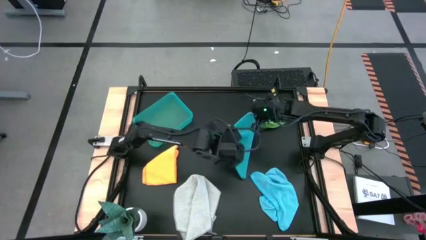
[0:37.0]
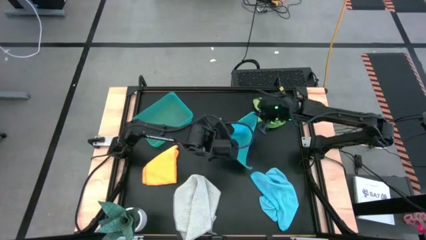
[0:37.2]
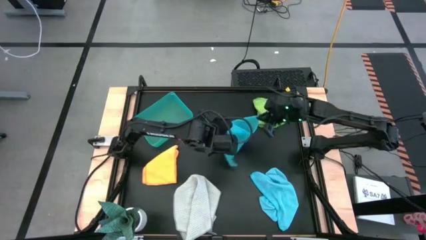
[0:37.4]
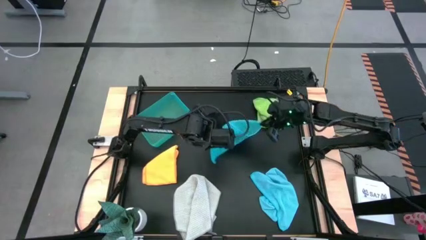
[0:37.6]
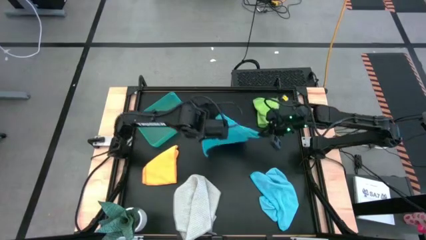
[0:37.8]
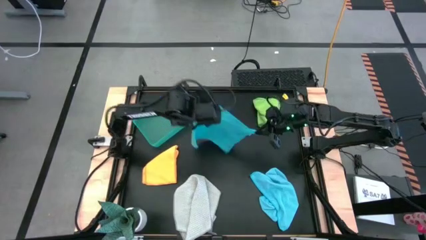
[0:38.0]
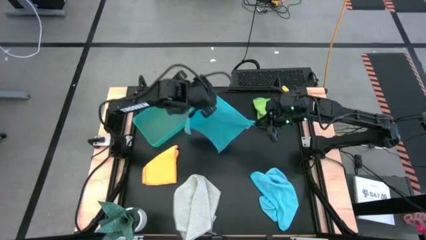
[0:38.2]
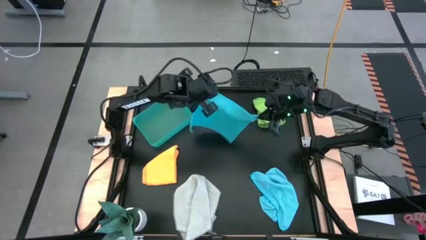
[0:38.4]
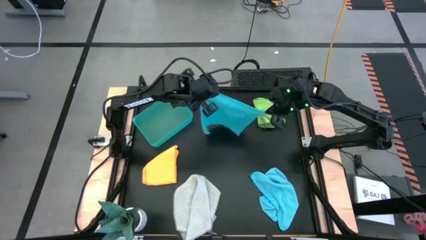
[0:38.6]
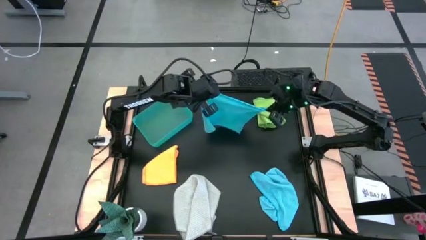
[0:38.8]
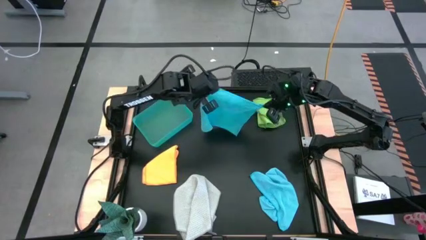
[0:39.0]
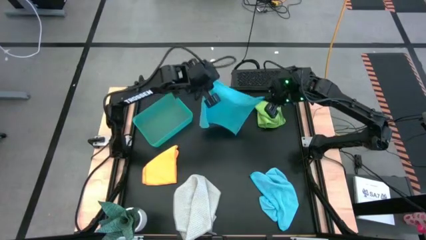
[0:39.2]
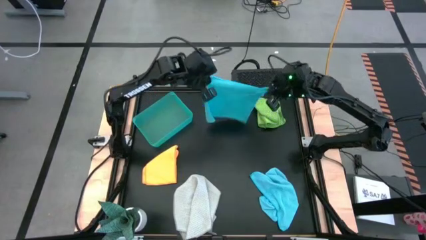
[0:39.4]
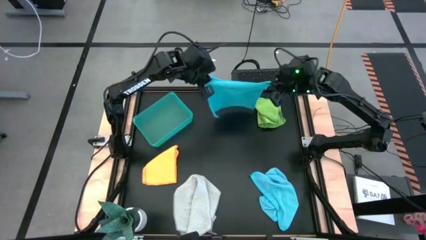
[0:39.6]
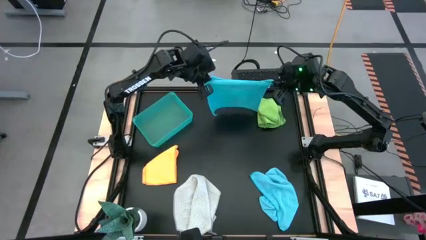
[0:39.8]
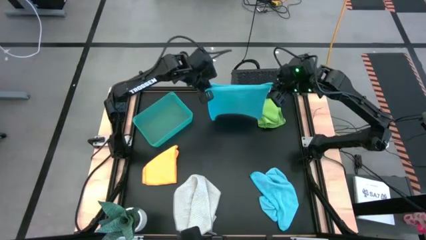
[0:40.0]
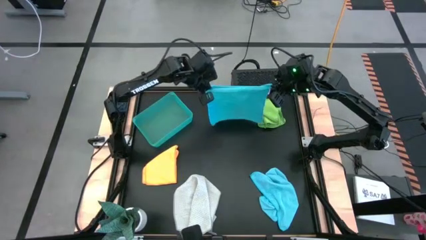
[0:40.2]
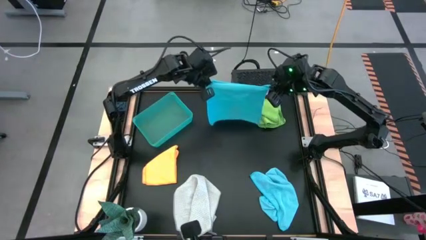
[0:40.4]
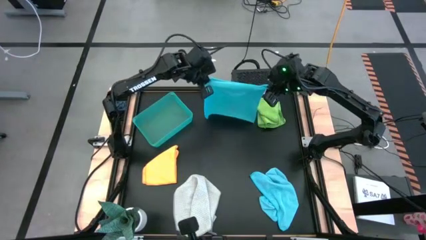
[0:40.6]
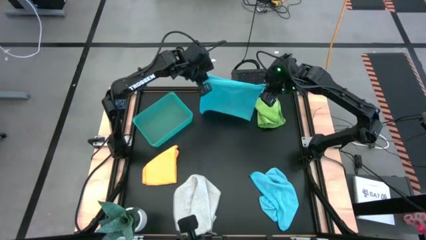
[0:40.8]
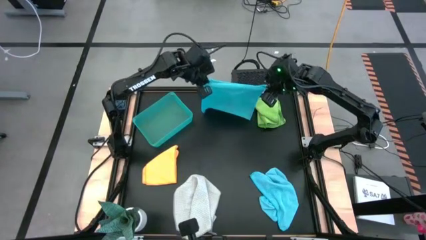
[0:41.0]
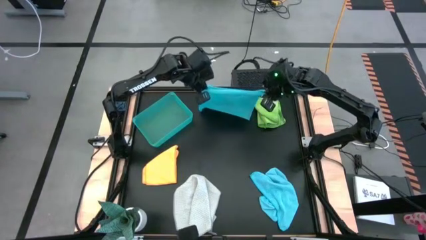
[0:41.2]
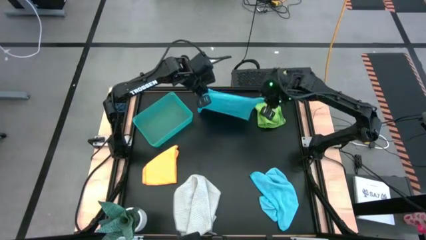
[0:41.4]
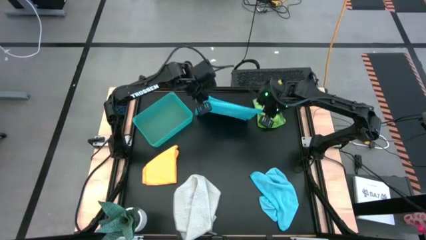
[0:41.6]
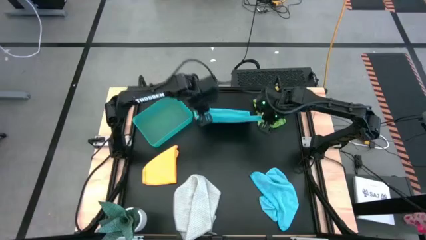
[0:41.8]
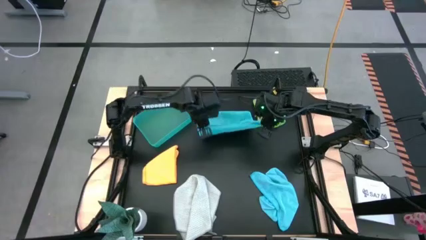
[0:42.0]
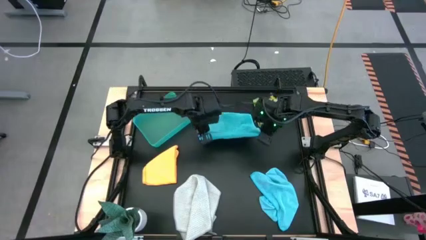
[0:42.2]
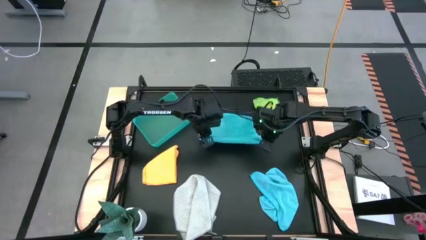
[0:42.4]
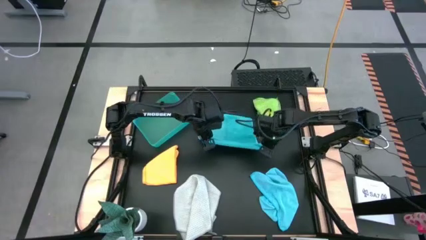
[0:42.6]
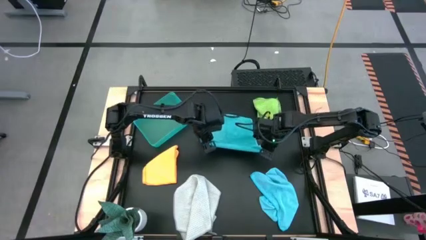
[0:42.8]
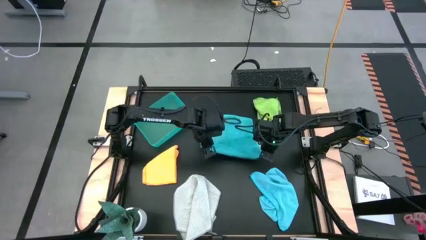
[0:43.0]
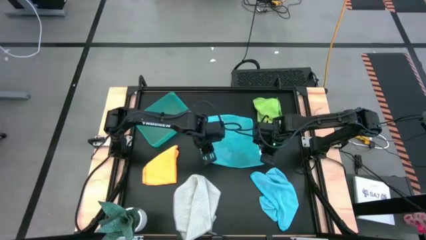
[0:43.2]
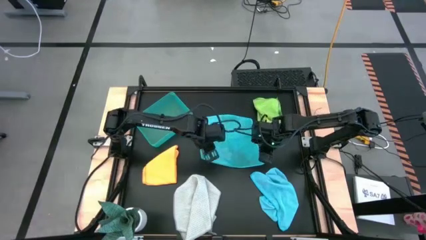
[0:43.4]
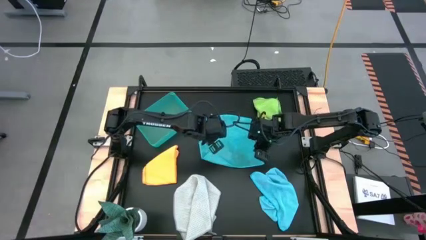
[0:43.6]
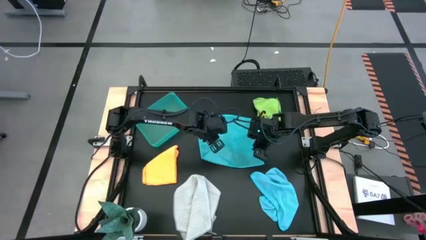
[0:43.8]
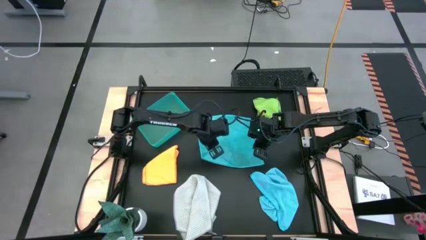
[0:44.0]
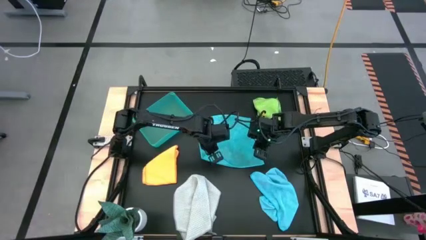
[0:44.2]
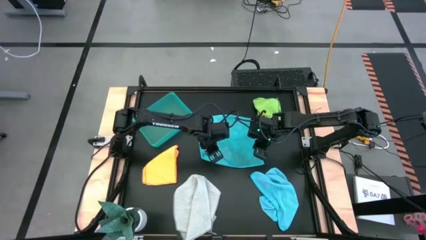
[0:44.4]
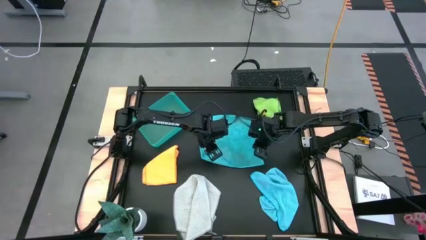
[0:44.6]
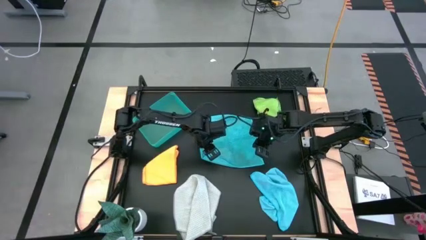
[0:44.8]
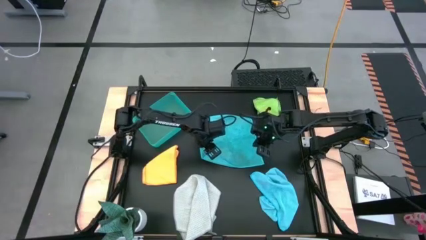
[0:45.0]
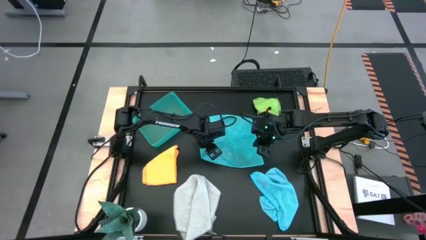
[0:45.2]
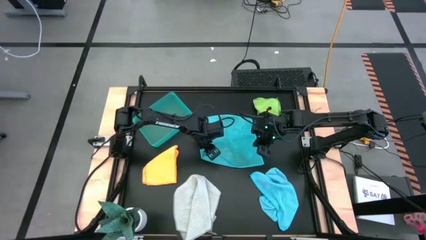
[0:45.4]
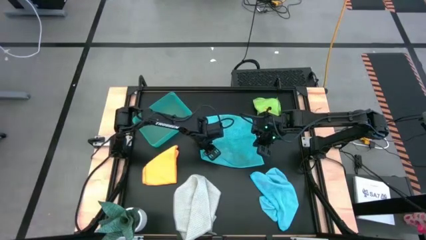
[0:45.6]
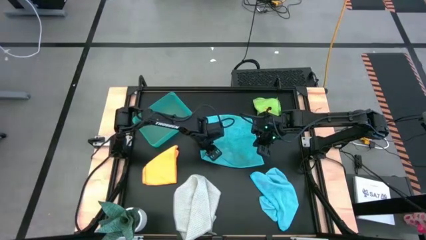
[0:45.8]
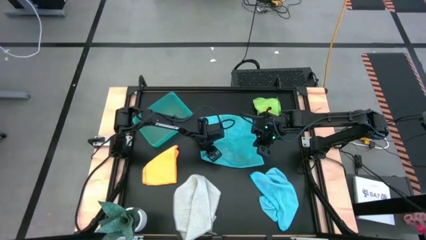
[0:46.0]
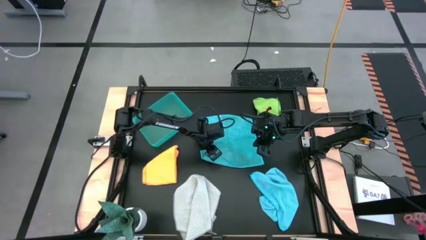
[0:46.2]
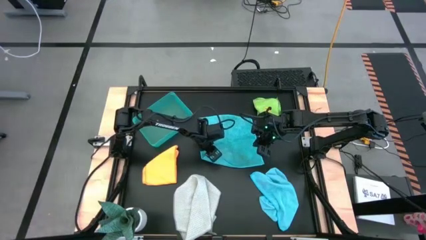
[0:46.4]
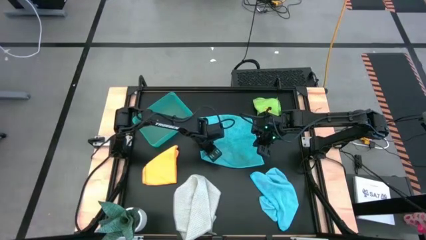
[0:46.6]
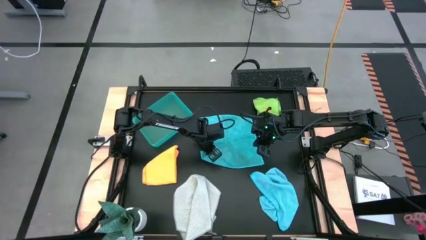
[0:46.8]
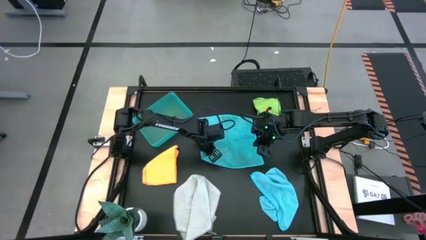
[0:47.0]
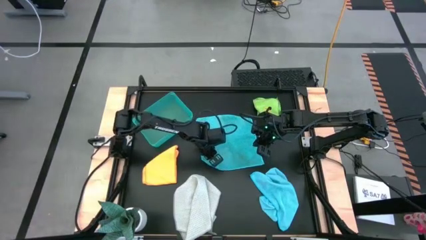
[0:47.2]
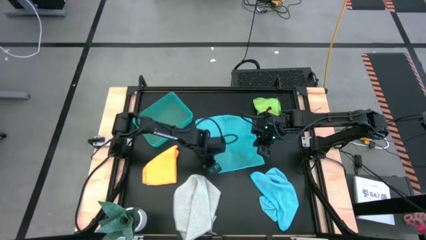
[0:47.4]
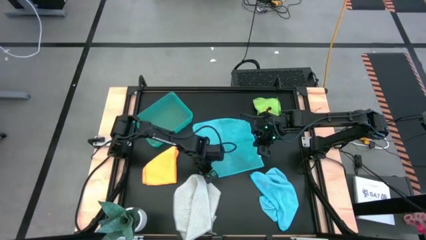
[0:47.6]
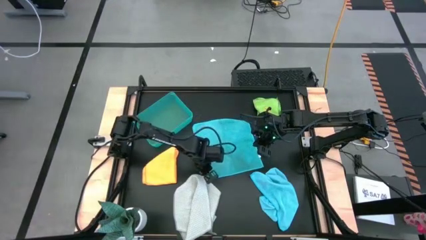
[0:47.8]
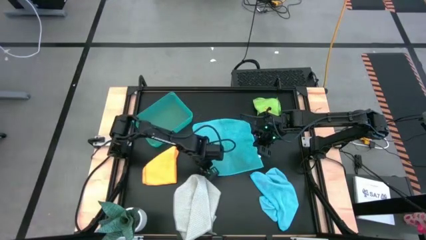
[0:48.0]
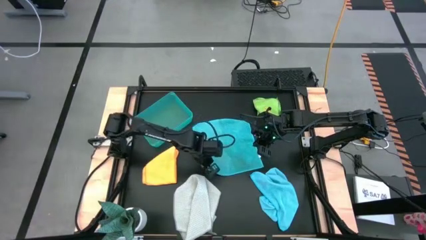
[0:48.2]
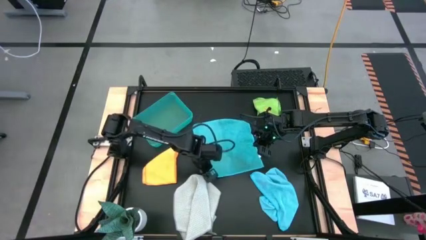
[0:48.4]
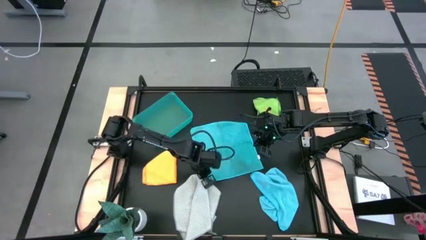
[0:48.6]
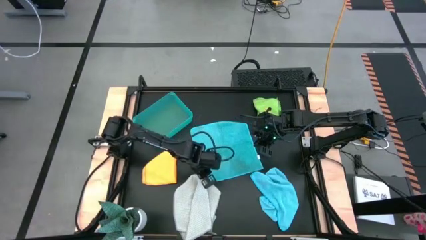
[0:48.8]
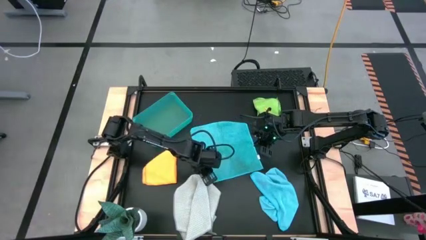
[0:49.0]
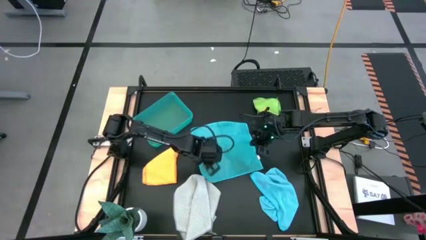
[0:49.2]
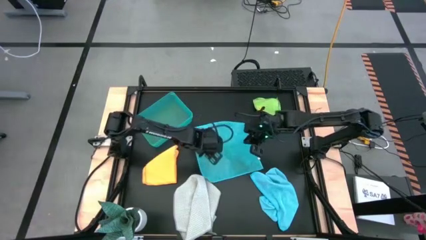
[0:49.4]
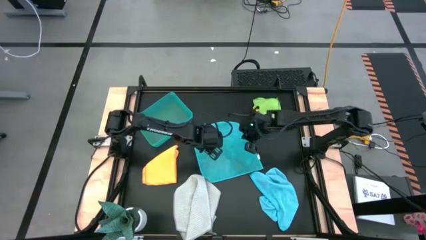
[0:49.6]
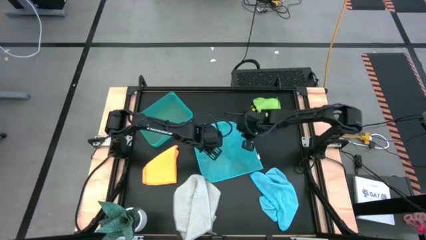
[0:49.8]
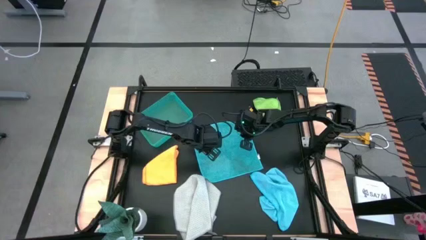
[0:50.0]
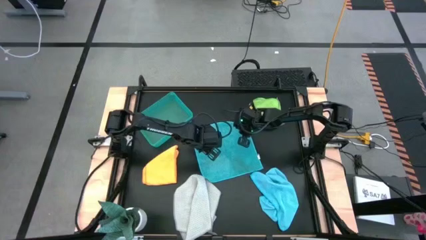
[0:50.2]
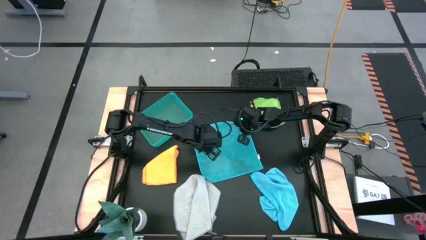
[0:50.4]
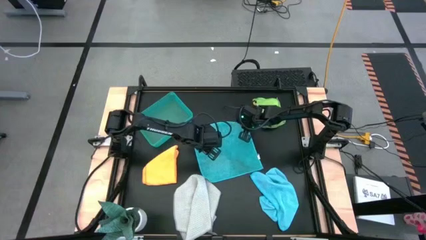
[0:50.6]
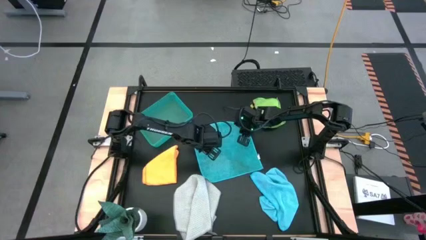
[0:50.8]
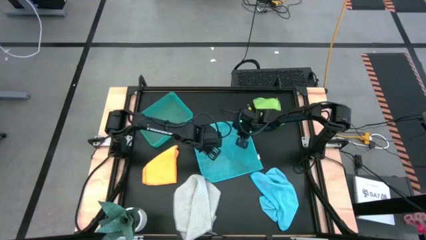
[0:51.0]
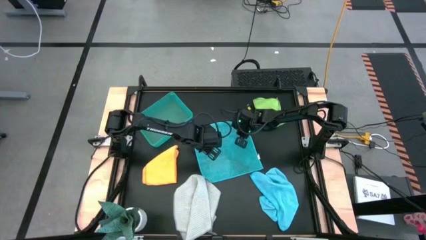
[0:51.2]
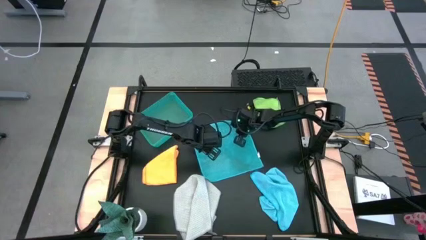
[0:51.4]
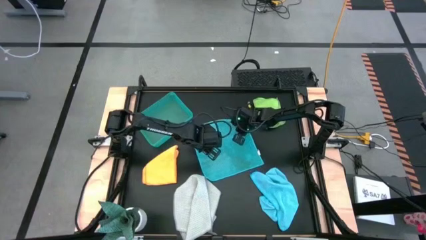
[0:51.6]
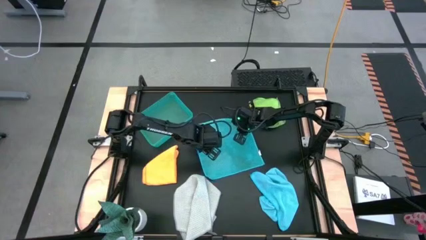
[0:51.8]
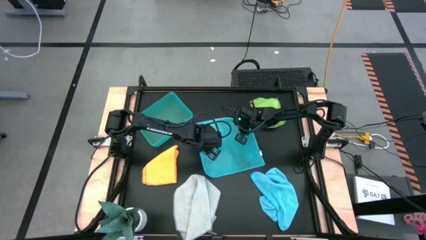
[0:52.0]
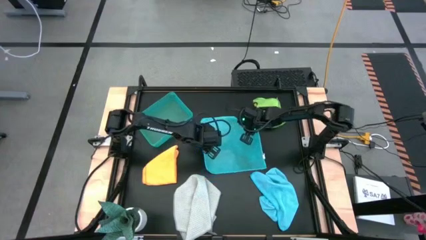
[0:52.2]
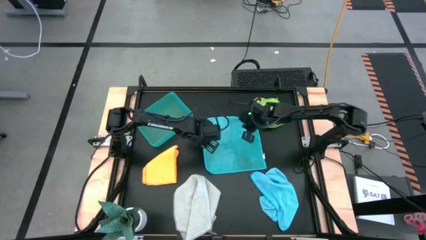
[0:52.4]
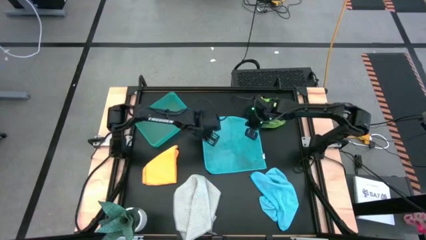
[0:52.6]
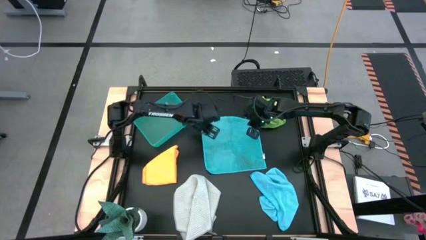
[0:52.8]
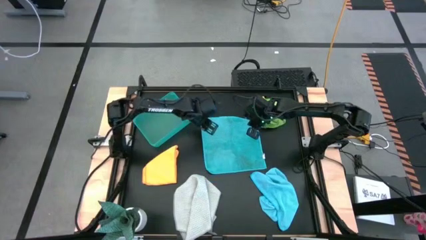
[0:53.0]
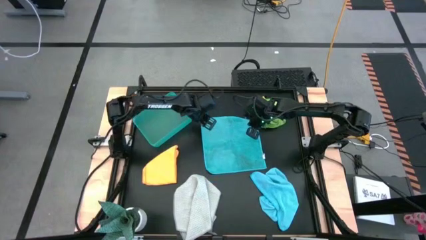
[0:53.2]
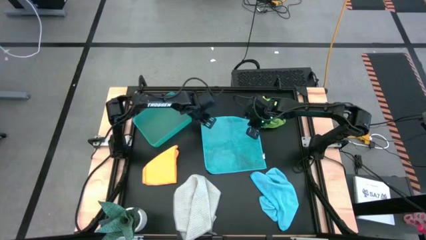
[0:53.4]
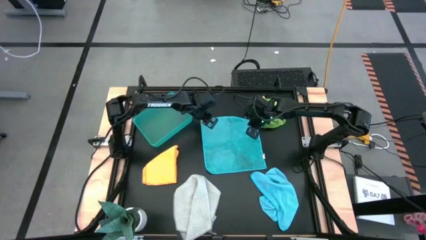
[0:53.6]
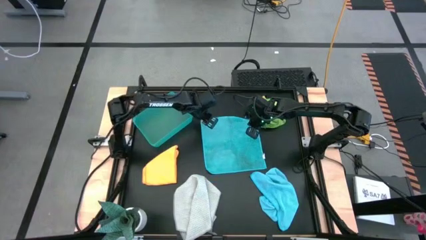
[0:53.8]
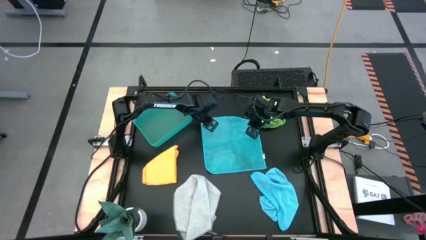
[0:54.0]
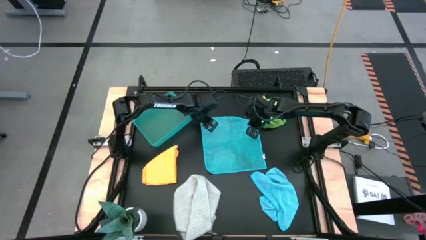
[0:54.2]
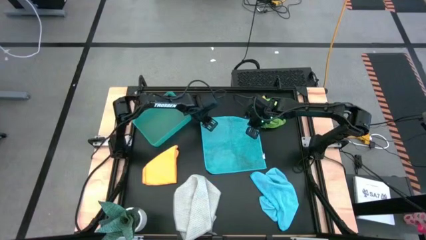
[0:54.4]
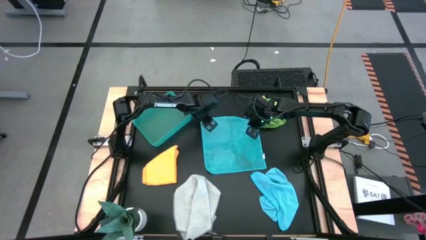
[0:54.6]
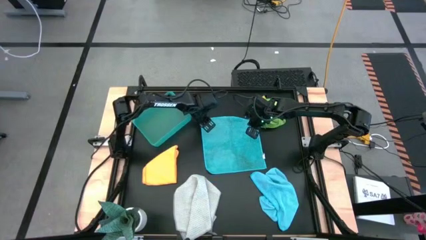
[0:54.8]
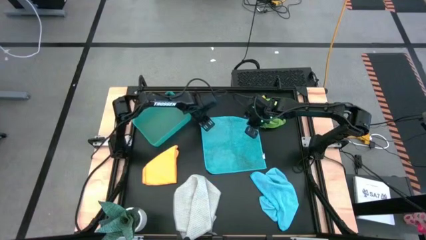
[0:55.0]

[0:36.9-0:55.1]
Task: Fold microfiber towels
Fold the top blue microfiber towel
